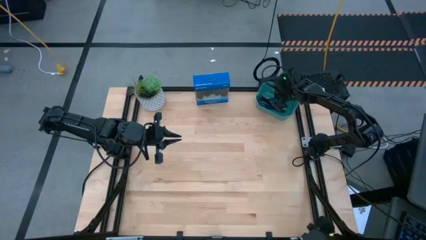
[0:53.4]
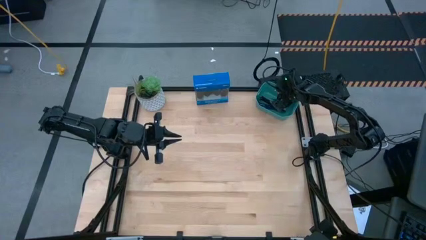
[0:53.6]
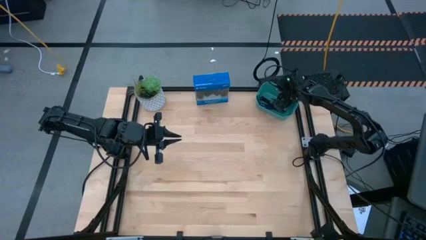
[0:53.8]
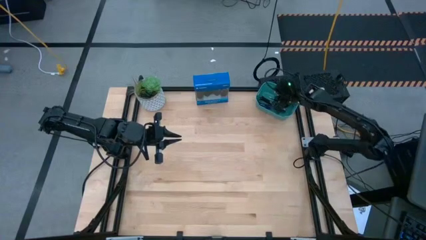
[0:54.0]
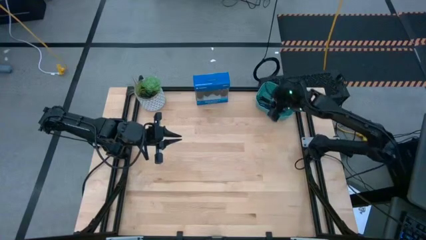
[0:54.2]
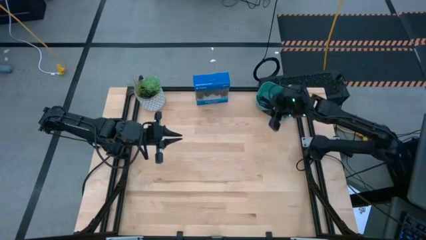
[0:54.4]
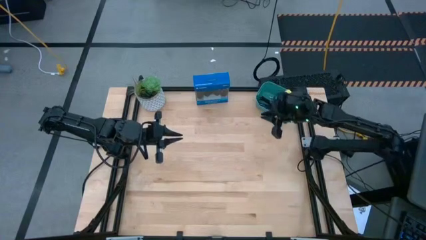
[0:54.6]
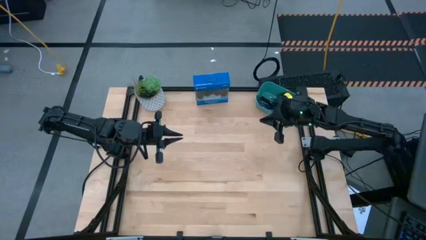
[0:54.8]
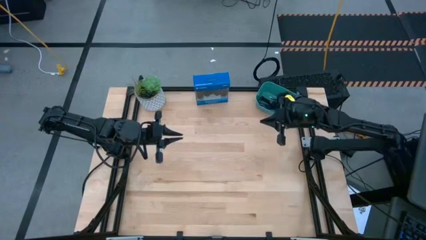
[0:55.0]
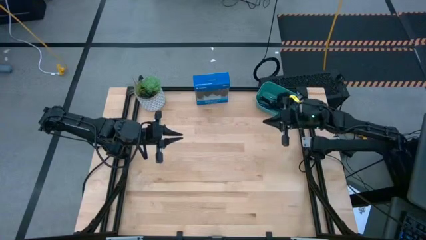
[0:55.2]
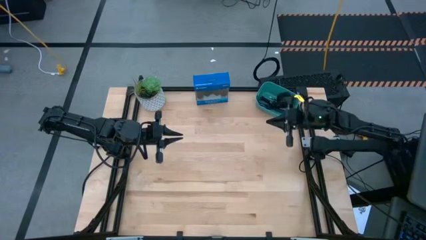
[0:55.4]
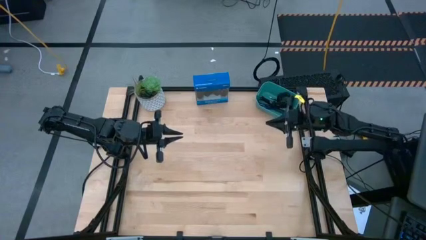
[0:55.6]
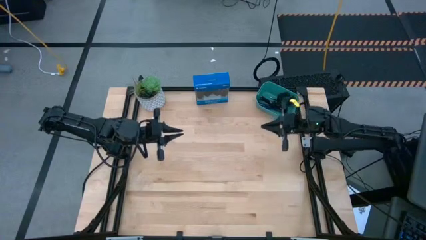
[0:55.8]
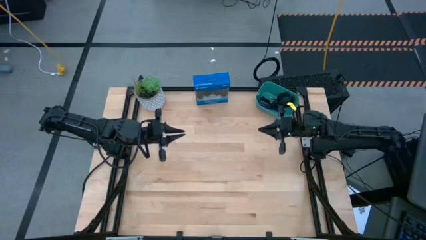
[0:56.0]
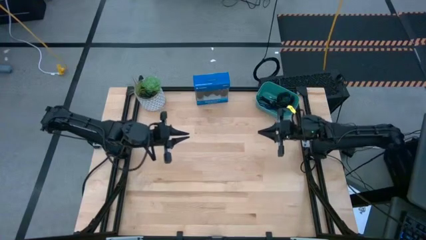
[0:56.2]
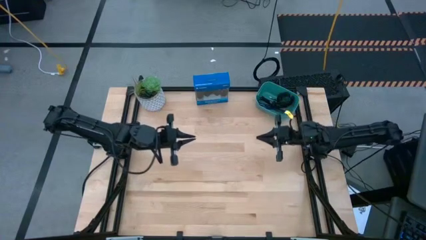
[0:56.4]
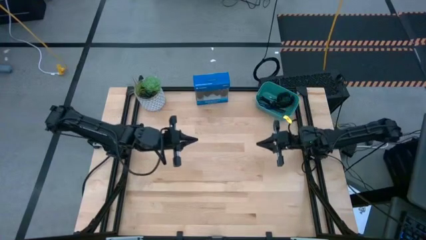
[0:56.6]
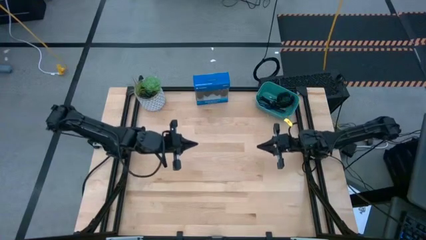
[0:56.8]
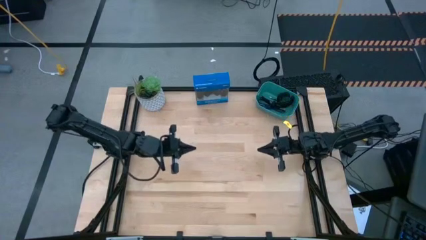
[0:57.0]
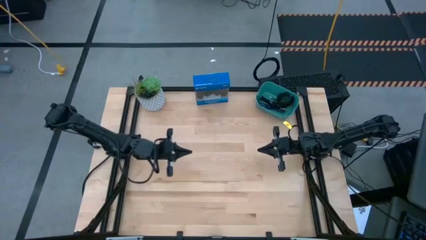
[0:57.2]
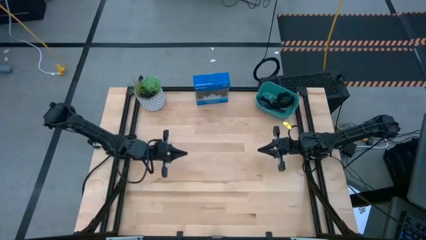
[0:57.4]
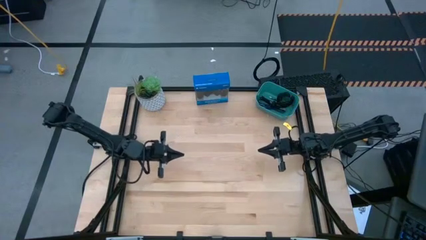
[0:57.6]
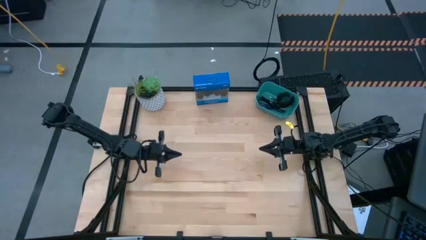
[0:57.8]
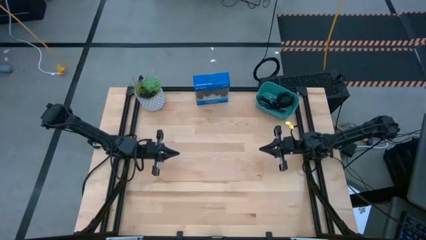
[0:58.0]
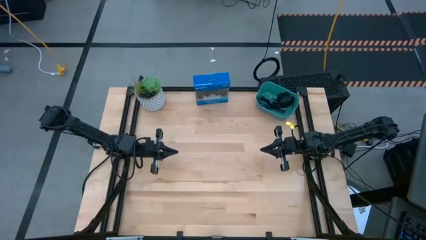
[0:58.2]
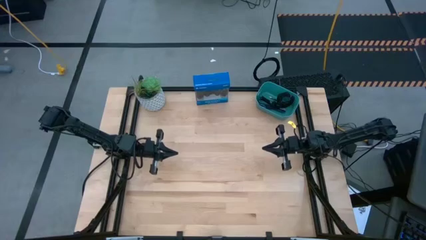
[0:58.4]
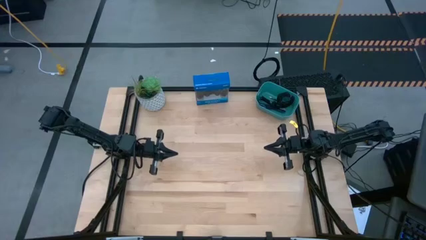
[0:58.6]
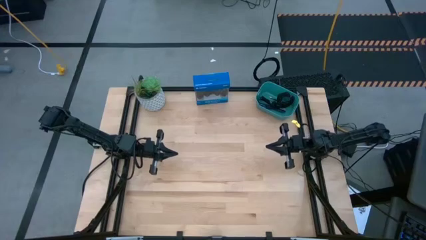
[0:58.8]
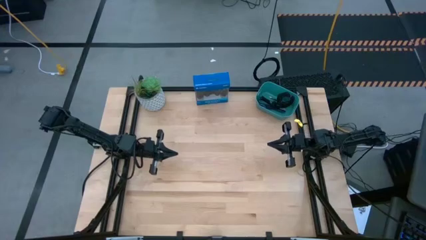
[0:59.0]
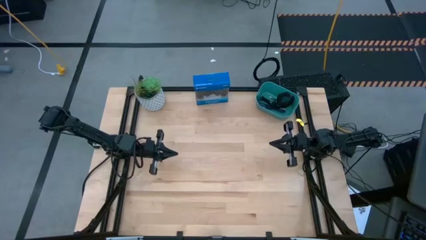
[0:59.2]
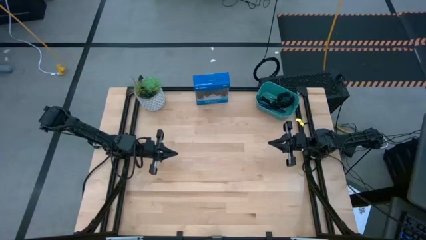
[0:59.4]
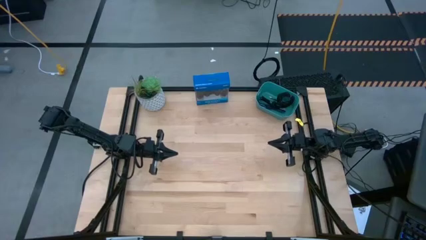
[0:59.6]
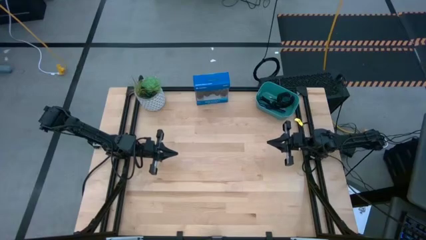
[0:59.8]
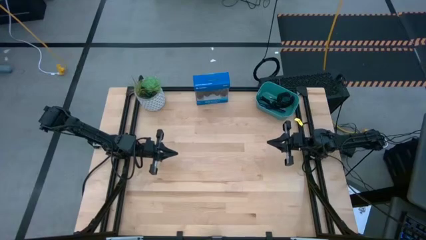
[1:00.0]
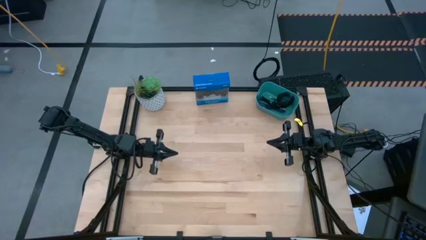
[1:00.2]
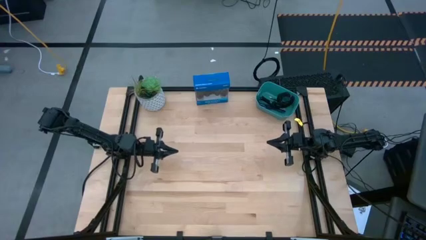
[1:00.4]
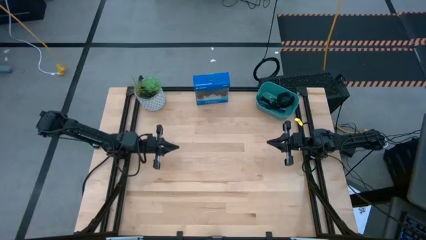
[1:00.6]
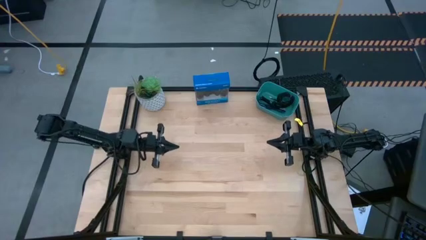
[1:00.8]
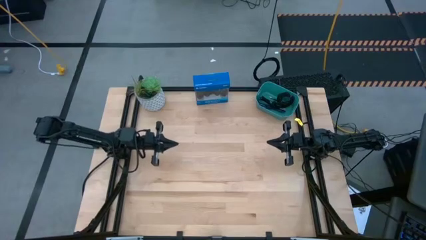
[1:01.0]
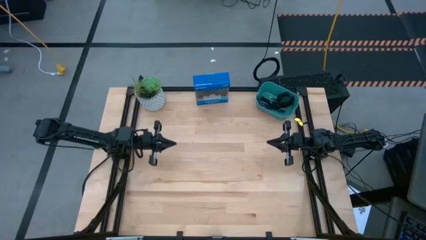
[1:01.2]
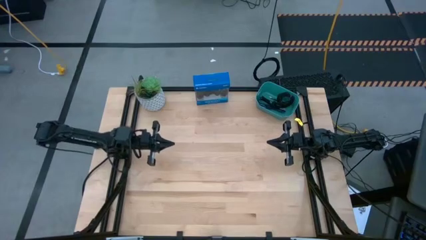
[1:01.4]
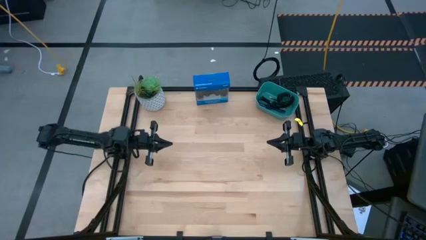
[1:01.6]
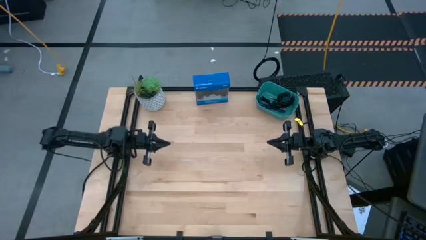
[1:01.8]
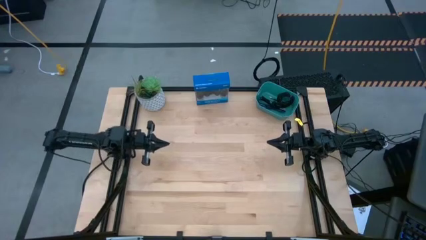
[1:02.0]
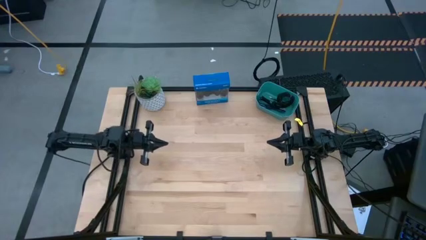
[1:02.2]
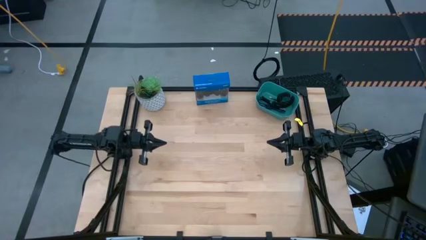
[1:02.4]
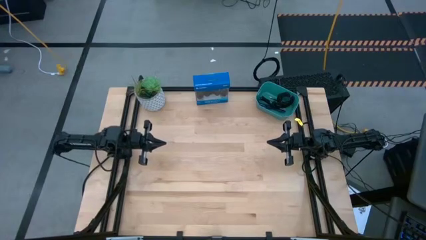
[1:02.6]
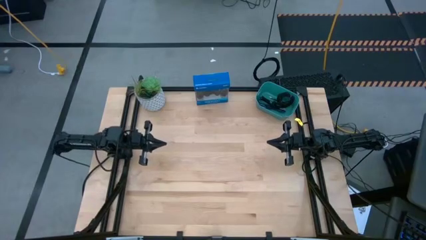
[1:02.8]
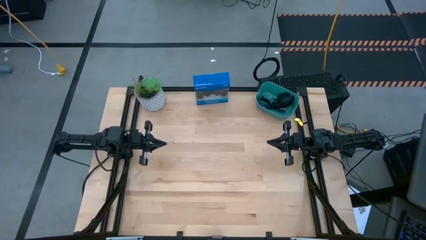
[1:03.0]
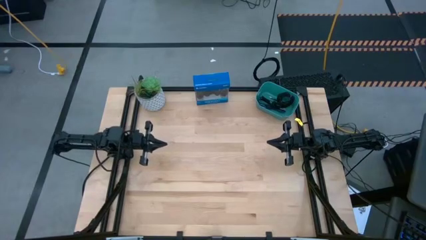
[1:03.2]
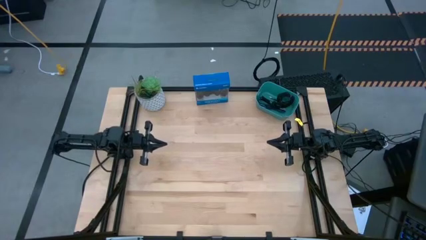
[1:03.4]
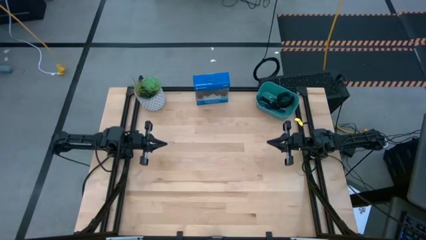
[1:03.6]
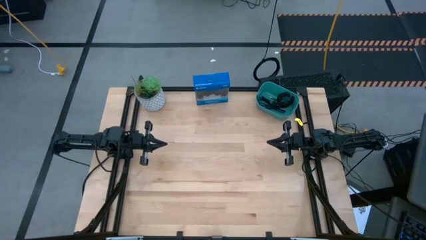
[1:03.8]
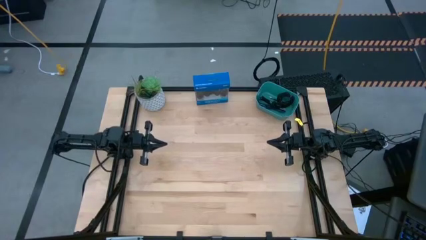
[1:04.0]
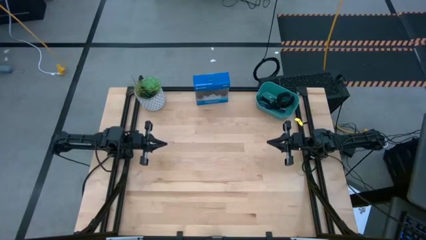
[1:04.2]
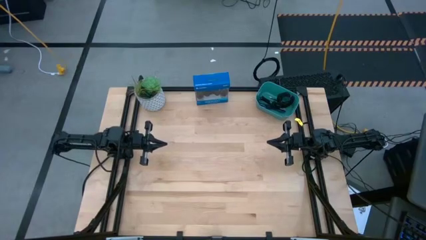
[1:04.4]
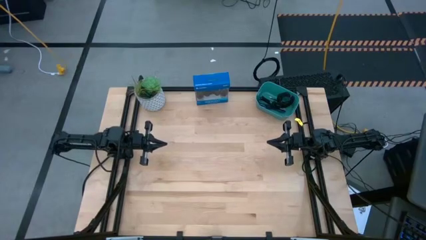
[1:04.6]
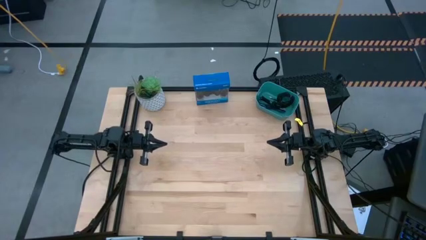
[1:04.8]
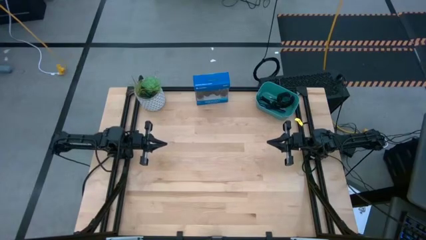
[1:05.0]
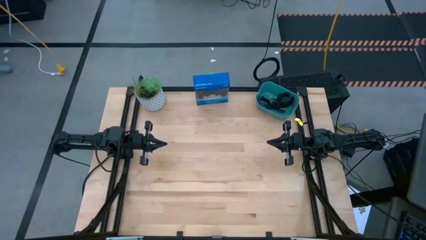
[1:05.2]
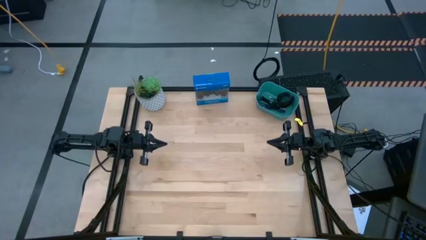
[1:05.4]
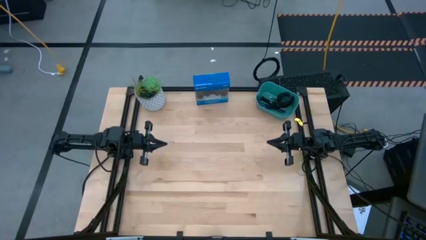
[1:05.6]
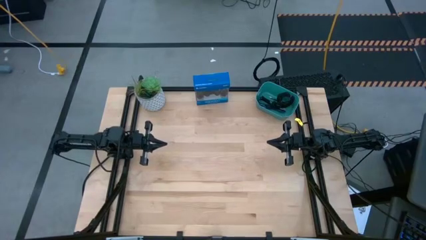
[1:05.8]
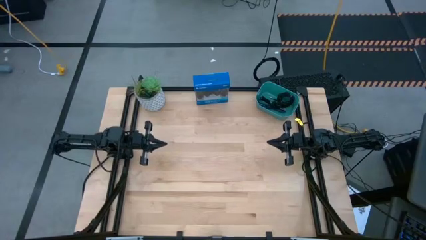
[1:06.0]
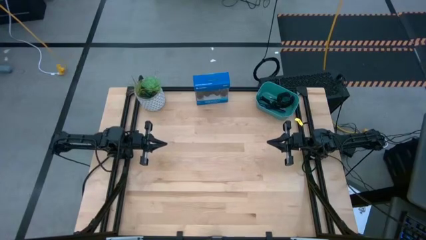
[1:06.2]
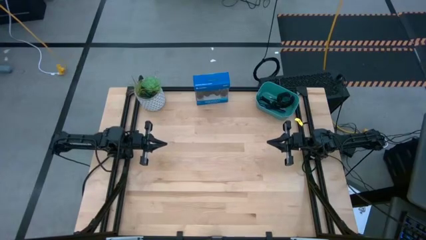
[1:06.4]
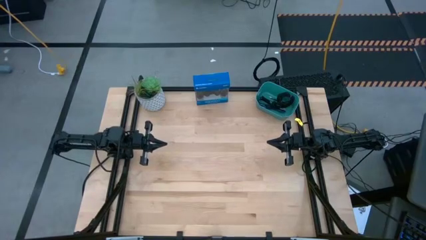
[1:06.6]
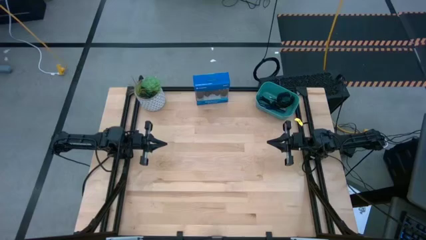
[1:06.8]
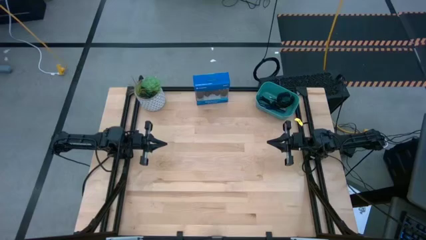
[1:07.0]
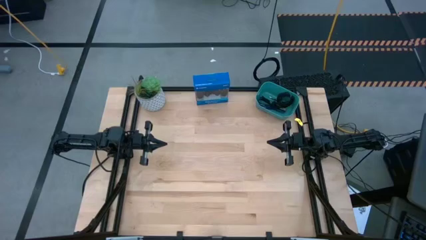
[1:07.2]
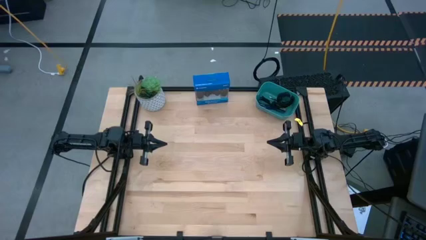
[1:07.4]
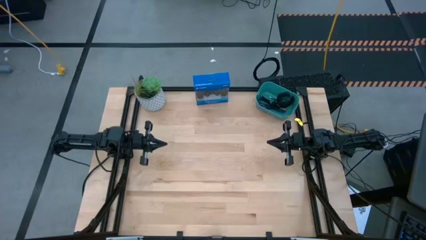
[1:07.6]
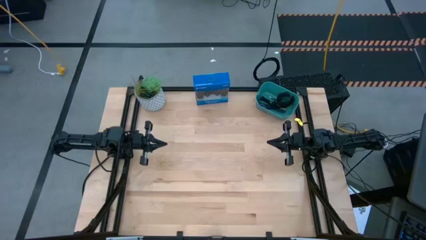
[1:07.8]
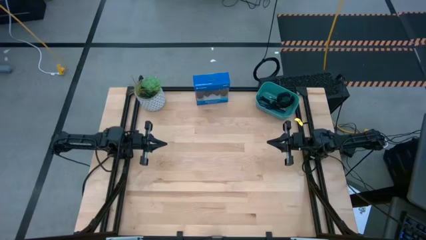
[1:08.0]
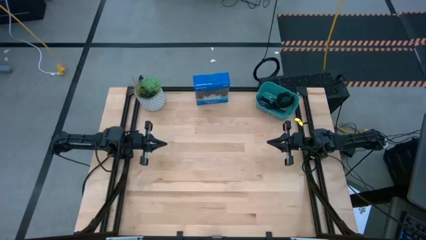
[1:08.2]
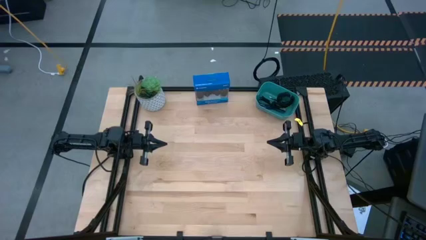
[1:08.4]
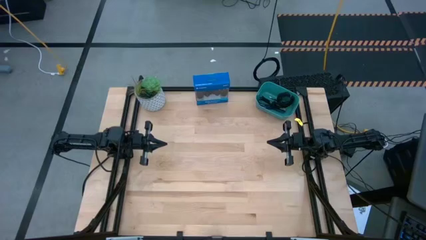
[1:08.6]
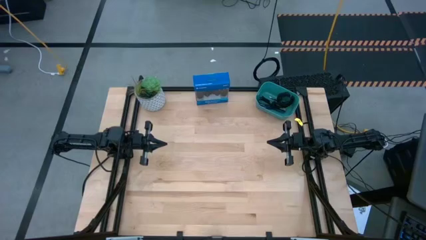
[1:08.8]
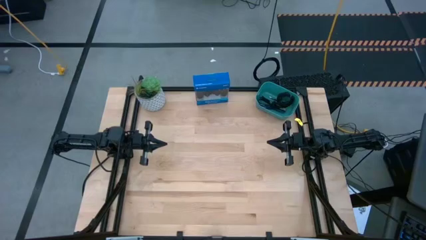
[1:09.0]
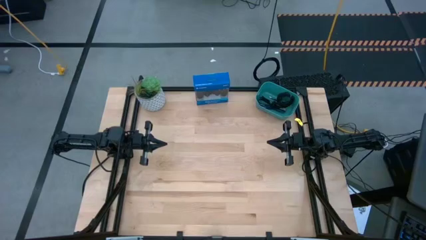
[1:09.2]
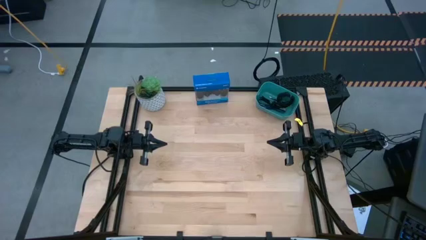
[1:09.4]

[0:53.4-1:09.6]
Task: Pick and place USB-C Cables
Return to Home Position

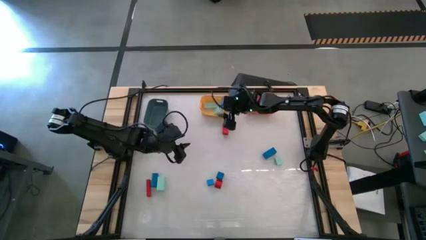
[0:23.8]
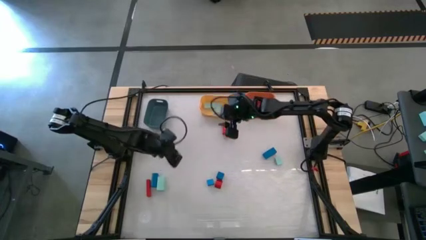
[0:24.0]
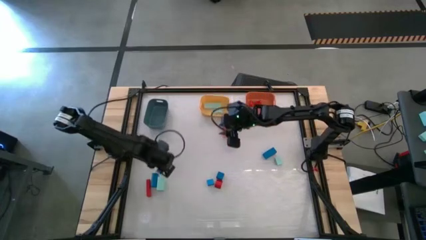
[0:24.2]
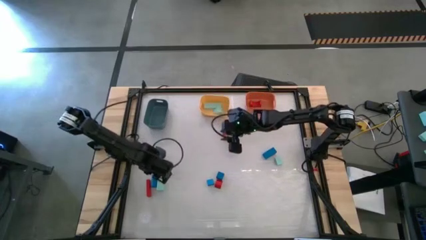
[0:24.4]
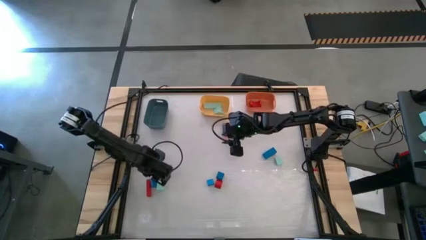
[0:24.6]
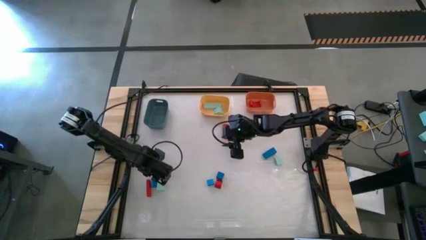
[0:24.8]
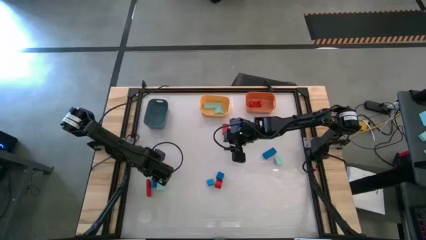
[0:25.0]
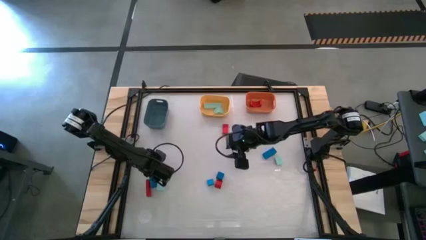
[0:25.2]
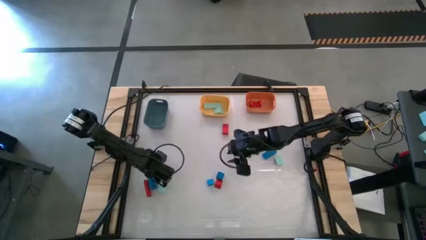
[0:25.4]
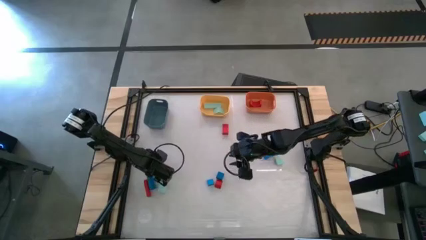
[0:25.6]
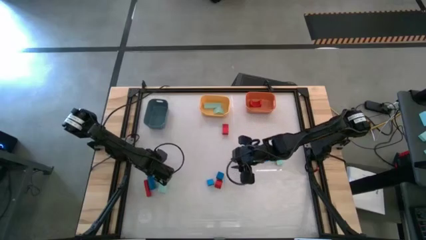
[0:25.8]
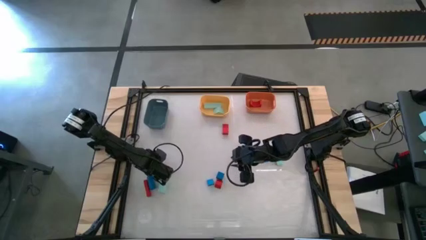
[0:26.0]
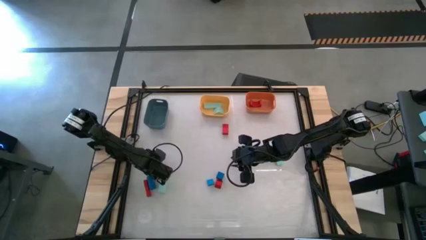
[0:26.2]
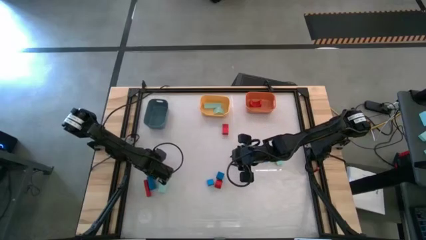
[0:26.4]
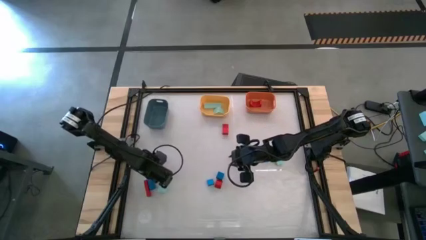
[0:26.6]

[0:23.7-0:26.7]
Task: Sort & place blocks by color
Put the blue cylindrical block into the dark blue bin
